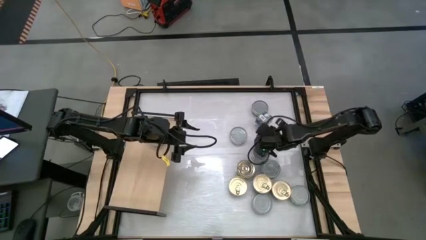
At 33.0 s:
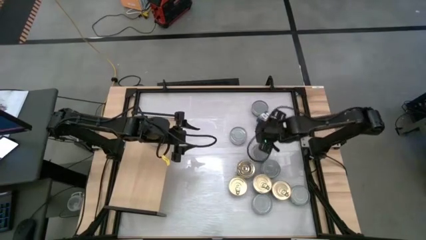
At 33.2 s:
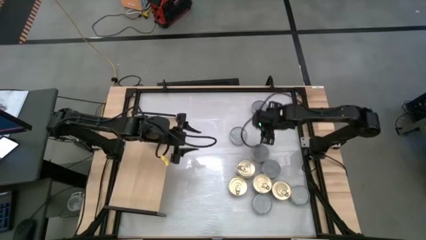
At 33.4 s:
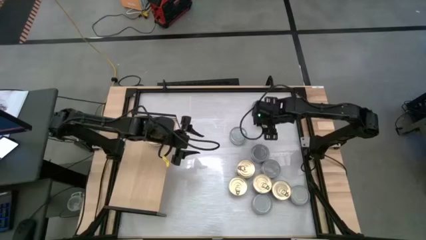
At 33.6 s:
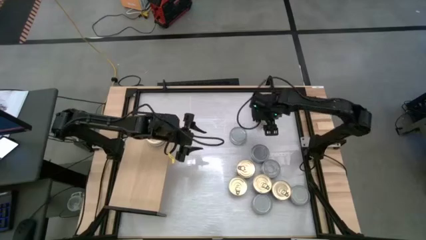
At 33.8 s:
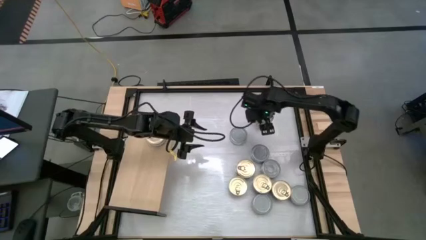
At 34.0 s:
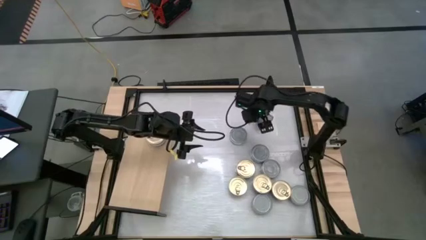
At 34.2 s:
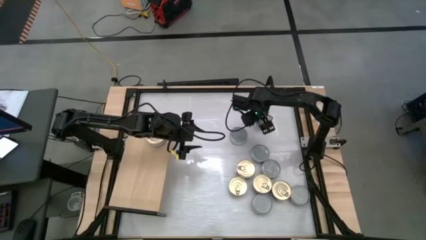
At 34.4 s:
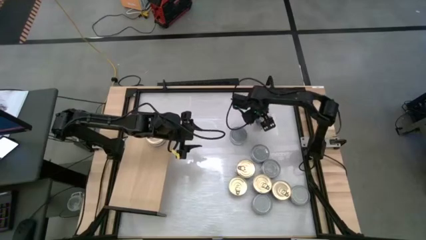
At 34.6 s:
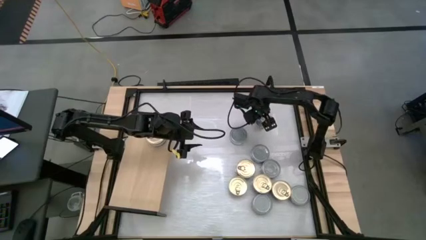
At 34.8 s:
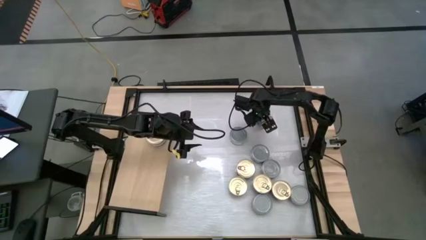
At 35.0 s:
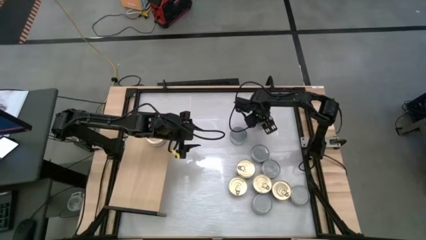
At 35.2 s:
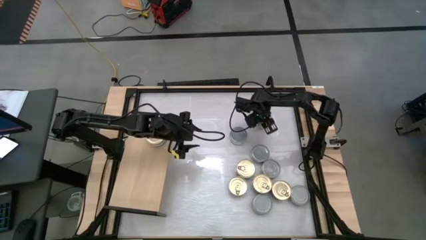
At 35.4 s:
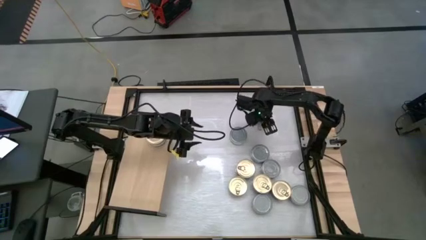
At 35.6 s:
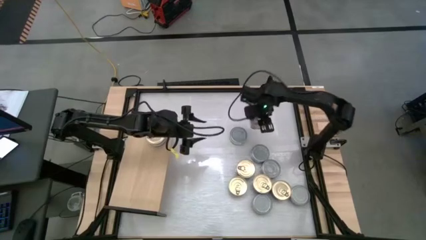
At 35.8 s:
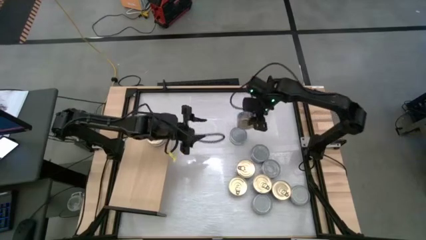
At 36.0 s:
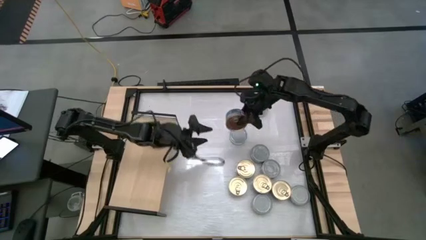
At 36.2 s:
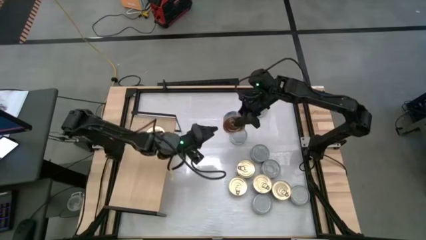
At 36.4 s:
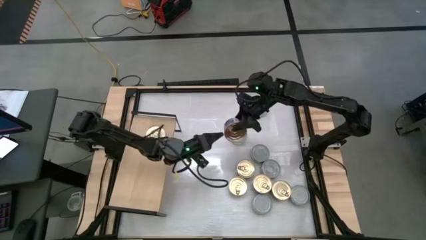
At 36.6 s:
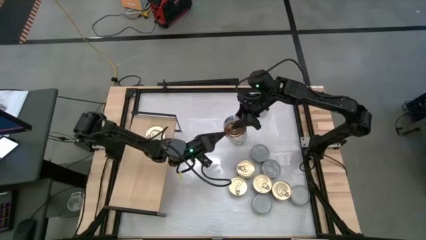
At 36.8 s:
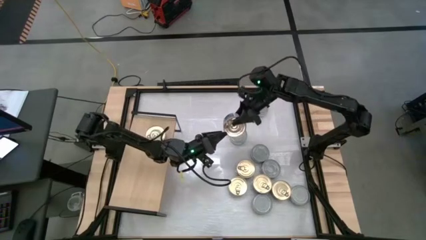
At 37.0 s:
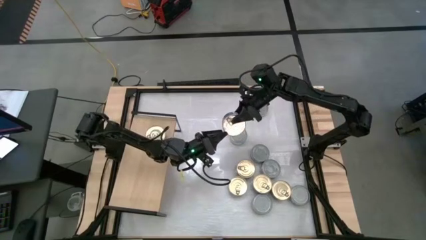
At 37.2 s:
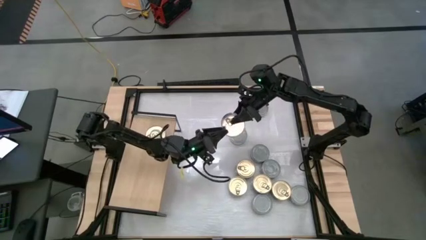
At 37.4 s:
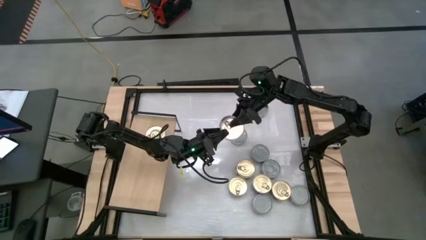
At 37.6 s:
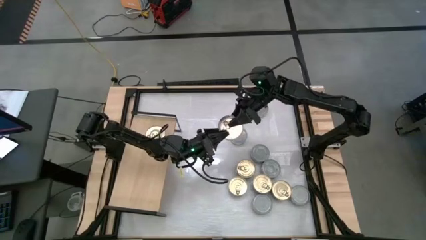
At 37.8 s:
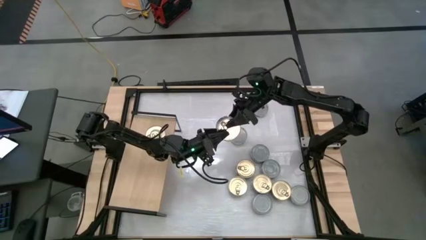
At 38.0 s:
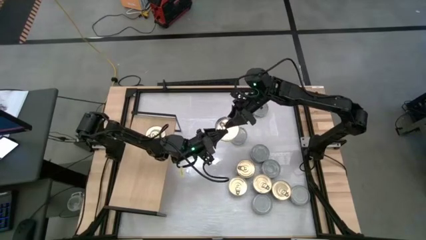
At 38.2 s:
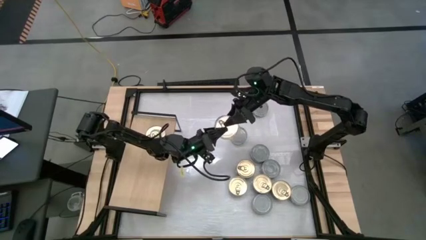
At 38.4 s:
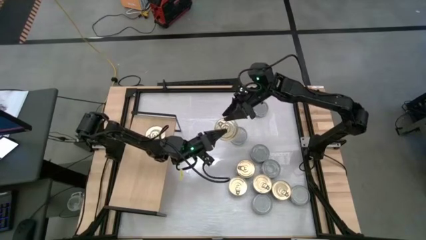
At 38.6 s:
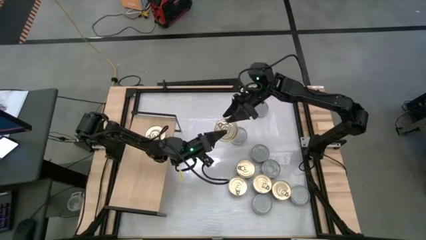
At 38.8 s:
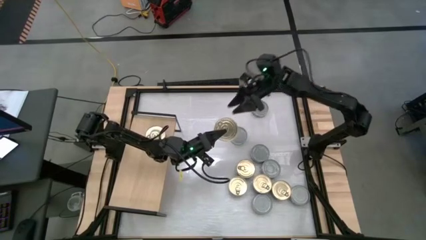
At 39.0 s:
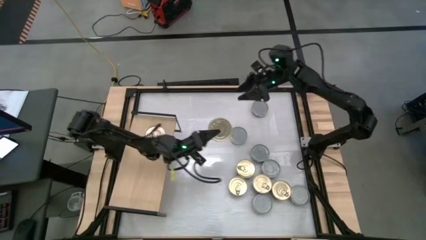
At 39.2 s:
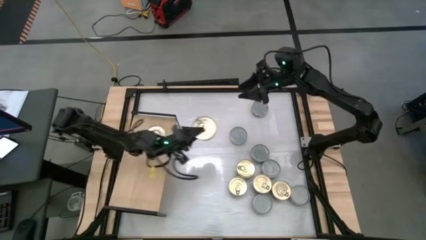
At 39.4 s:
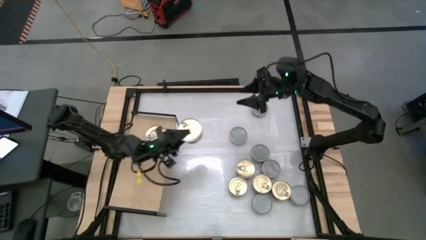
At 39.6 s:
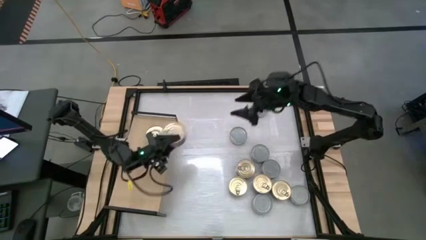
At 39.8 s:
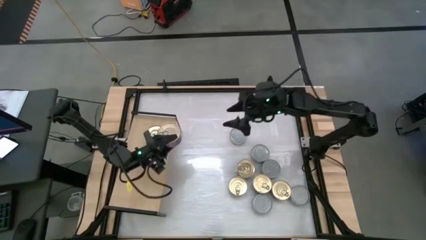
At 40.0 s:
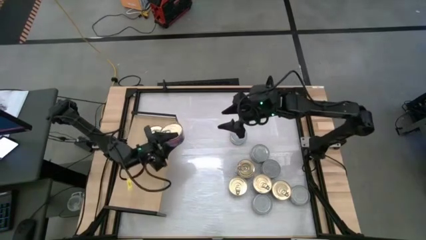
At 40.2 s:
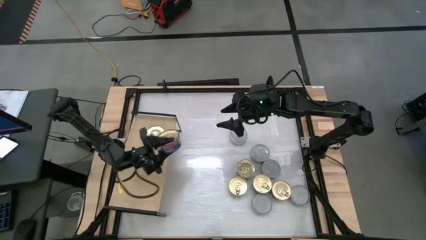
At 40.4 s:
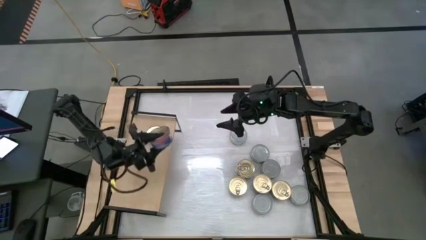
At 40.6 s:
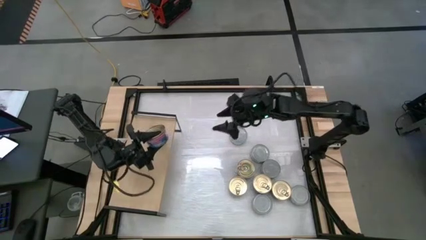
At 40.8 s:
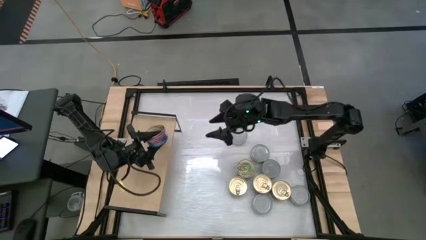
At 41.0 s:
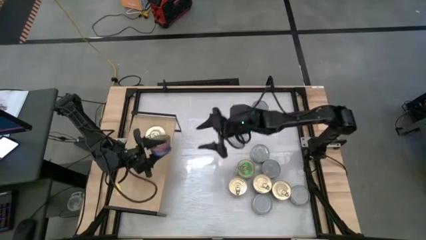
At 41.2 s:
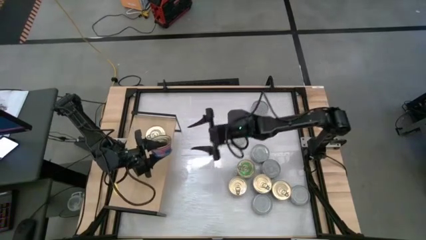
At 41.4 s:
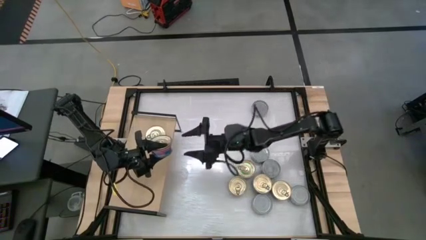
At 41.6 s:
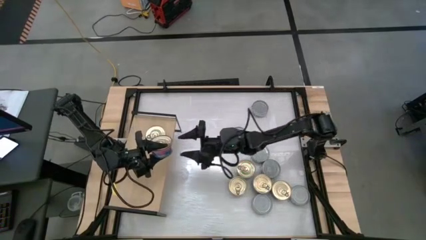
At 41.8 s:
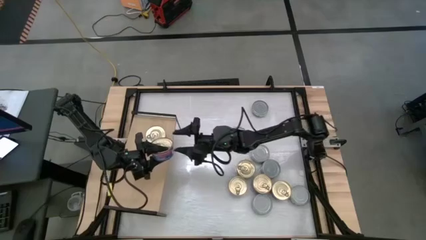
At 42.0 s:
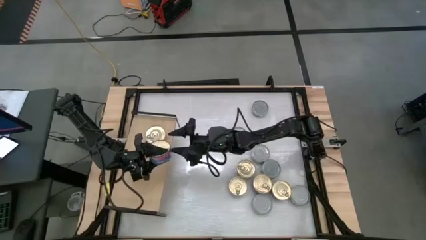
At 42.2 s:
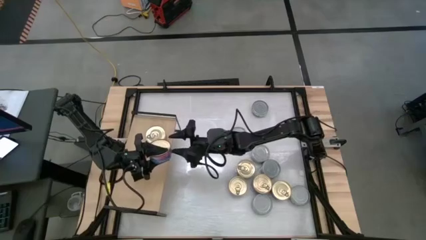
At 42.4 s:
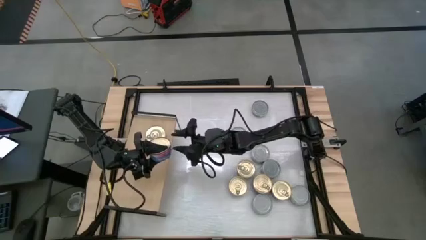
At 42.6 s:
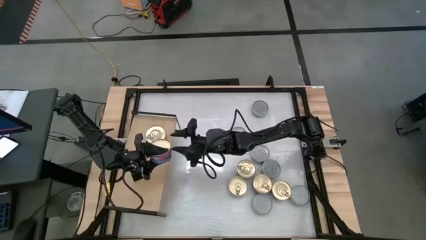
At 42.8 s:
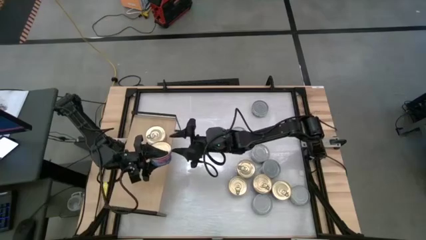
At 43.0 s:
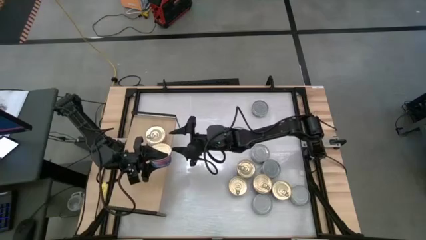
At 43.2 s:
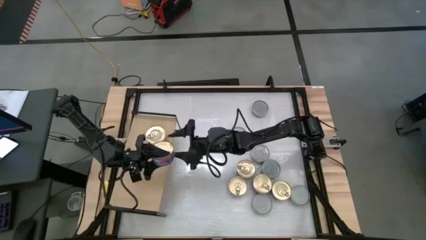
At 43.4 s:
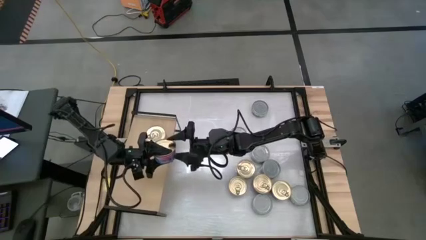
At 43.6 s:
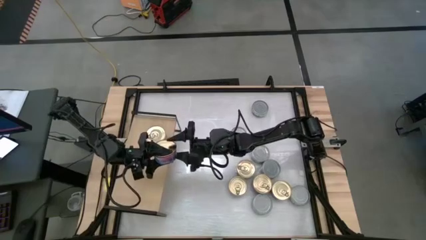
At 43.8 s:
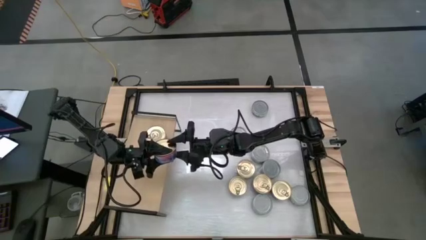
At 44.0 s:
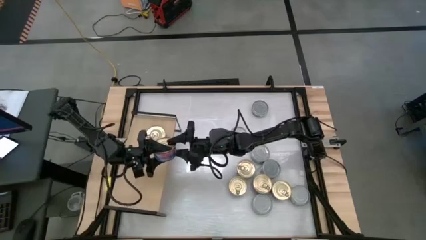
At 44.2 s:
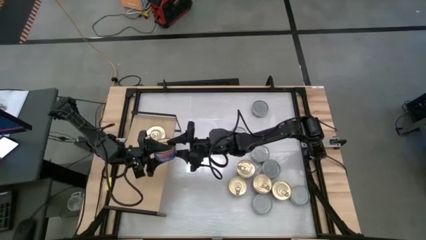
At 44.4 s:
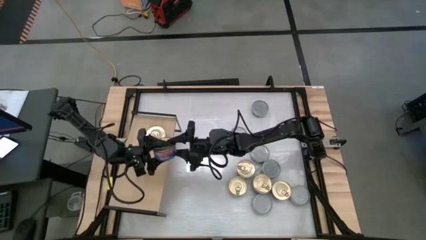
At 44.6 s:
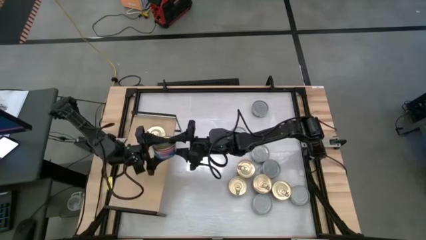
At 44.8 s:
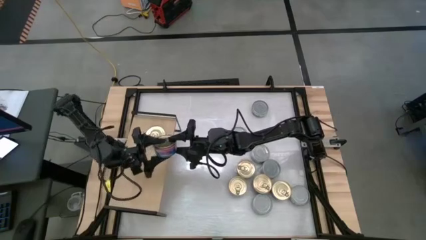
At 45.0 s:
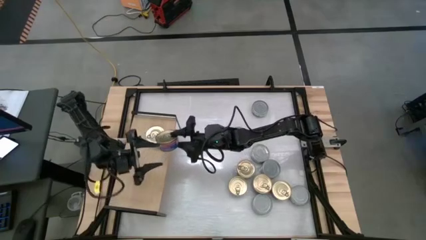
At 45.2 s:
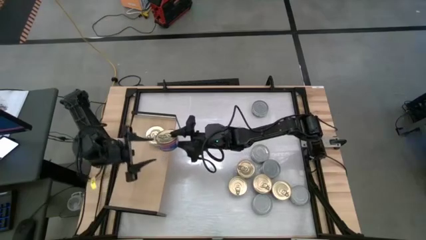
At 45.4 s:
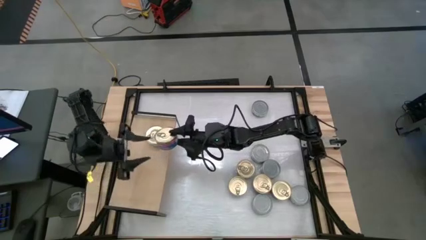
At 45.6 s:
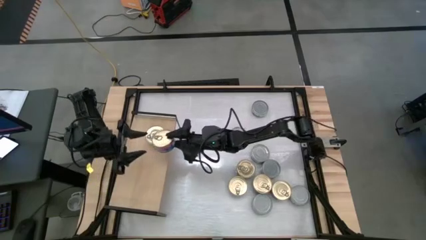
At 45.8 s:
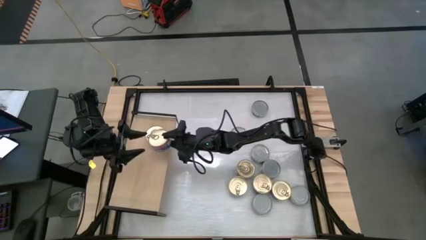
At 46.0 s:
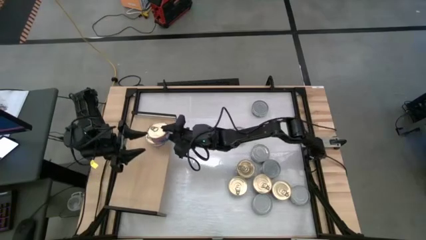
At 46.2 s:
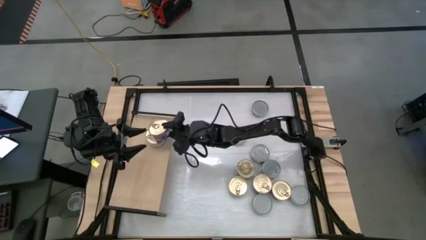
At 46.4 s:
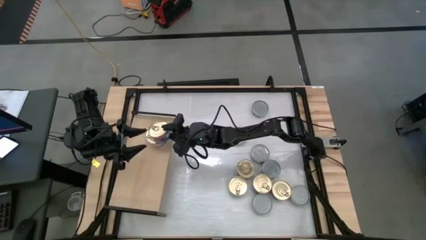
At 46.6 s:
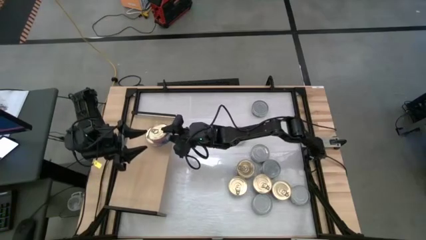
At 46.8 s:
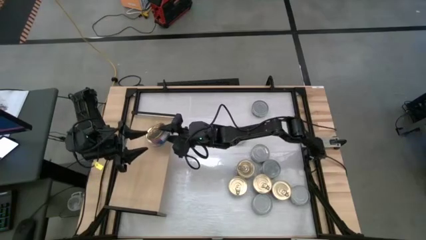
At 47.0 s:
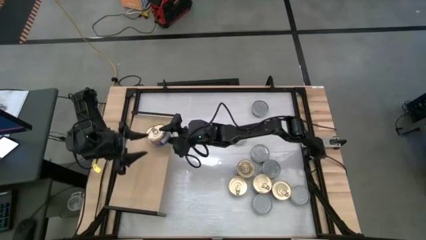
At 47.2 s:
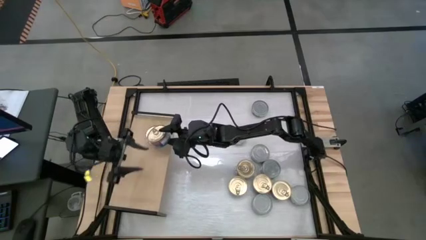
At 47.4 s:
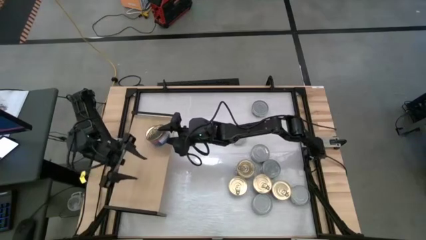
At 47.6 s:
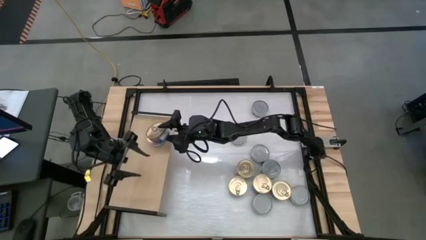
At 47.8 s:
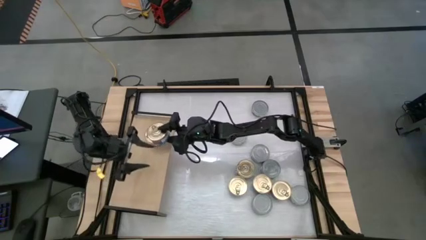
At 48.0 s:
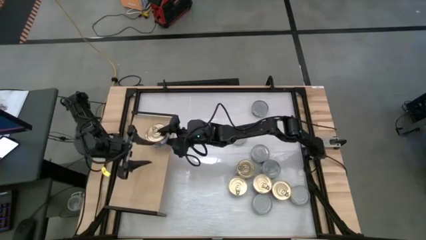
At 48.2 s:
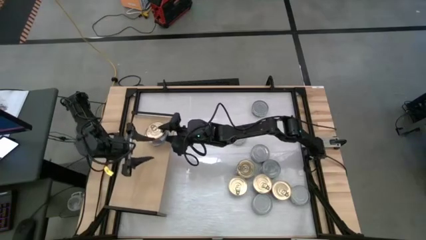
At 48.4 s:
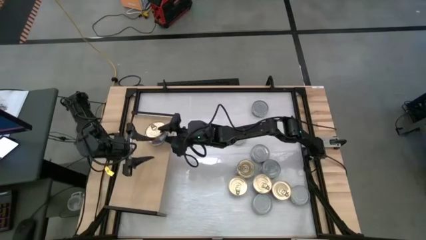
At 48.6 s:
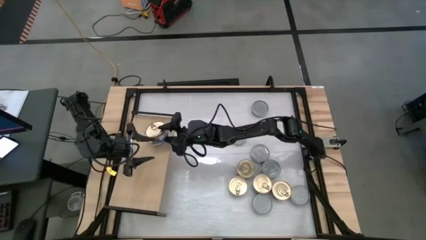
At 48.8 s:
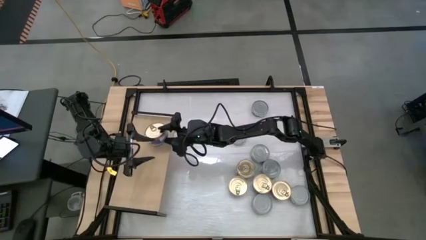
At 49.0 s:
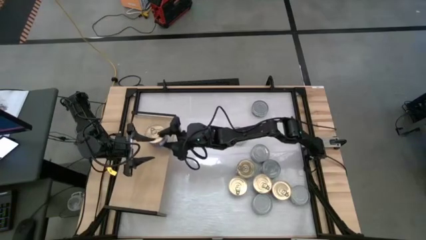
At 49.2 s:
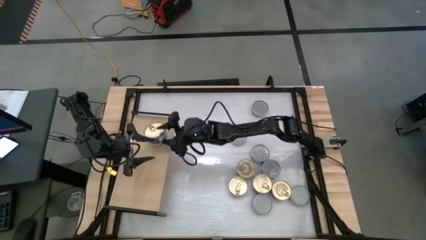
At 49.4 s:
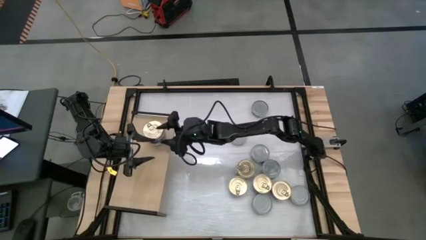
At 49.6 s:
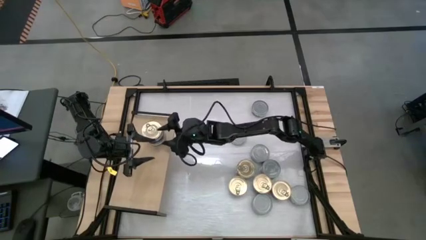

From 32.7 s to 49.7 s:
Task: Stack canned seafood by type on shelf
Stack the blue tuna can on top of the blue tuna can on the shelf
